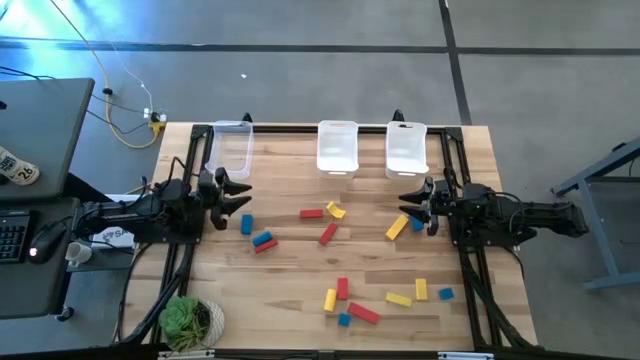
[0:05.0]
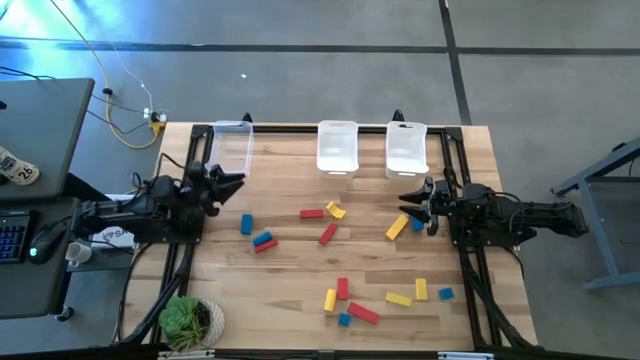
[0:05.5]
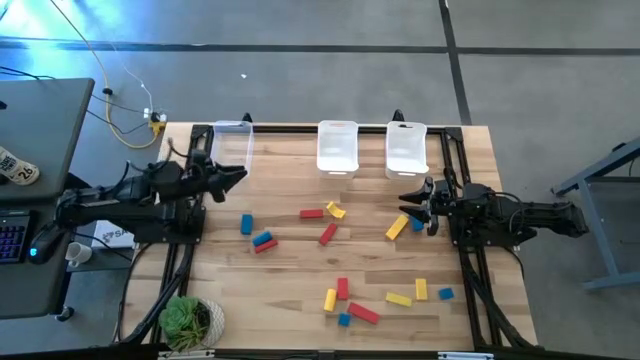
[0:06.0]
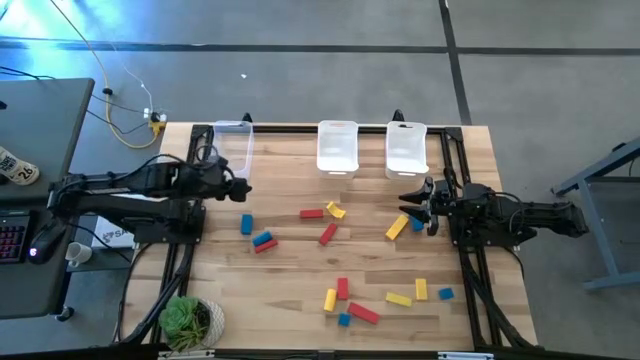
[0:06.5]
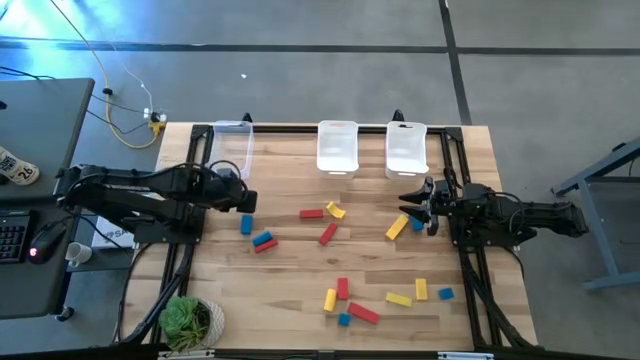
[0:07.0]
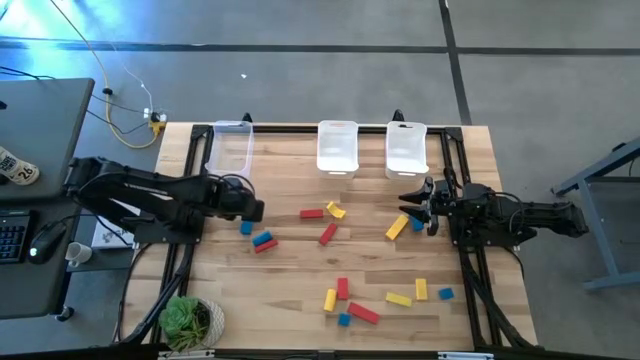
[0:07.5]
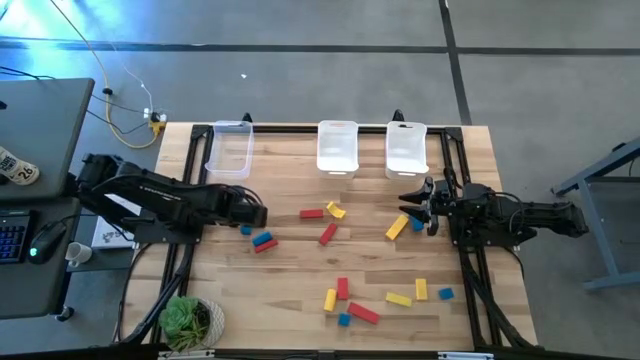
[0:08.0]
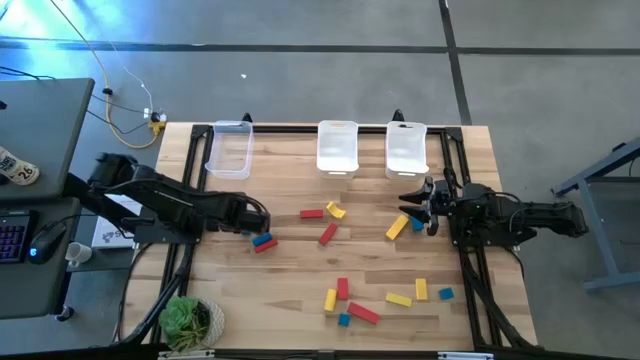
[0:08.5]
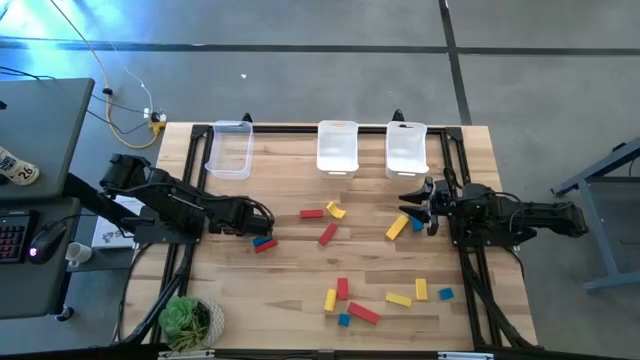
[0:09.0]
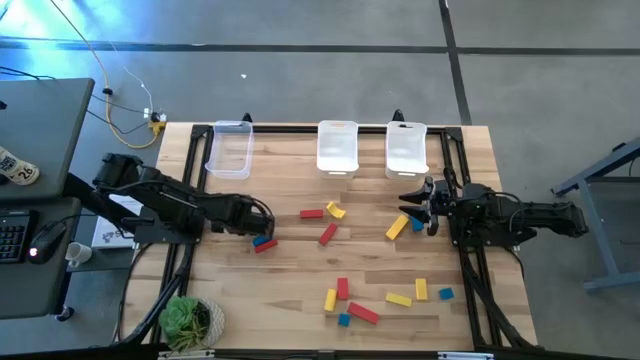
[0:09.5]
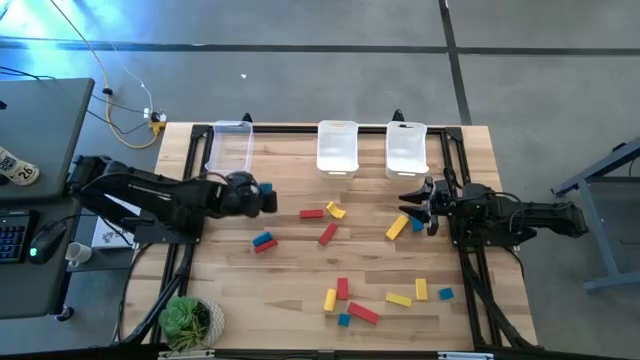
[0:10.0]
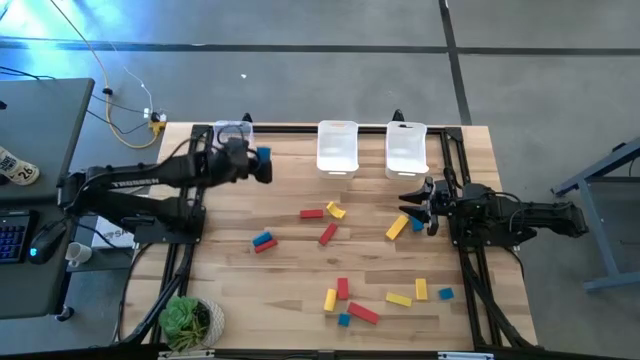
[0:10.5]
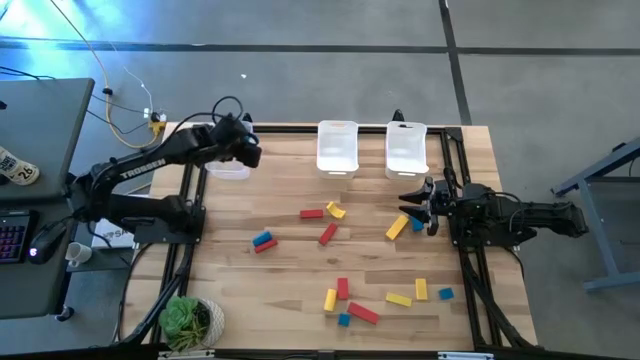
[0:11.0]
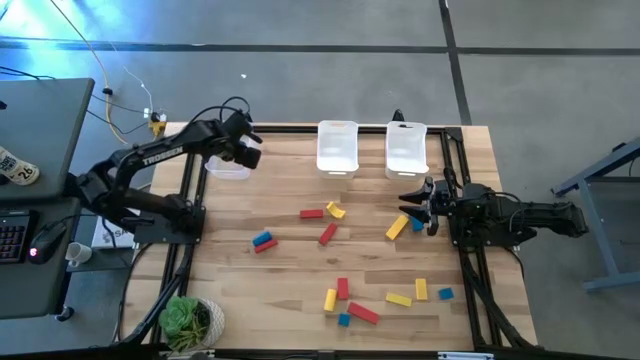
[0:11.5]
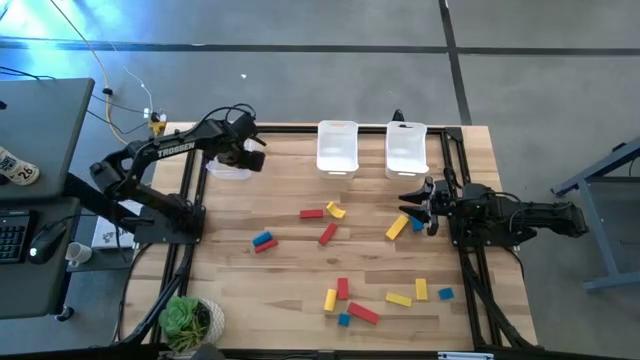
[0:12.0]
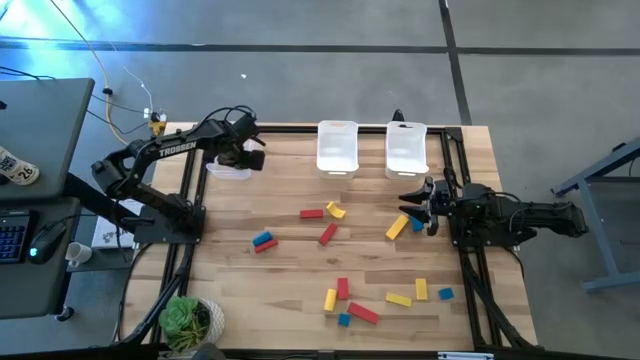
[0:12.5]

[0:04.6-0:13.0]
Task: Sort & place blocks by color
Put the blue block into the transparent bin

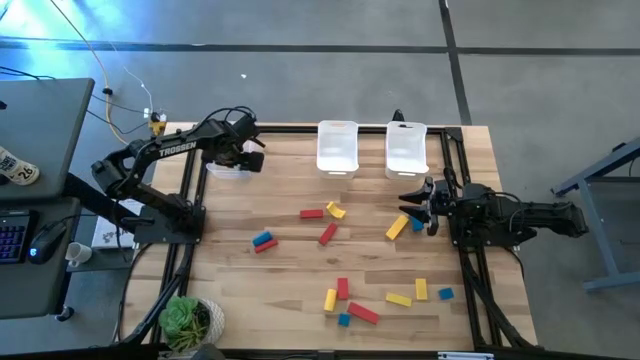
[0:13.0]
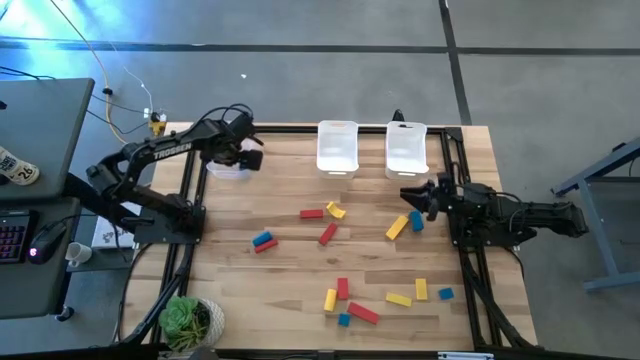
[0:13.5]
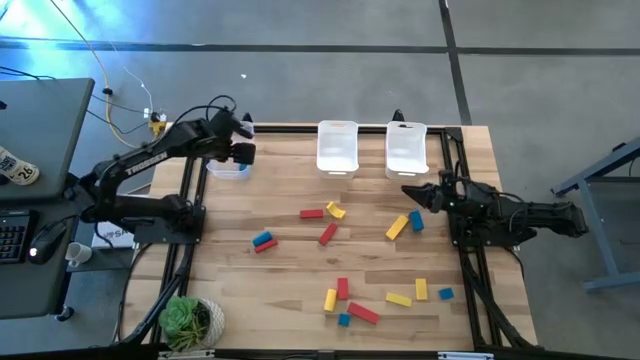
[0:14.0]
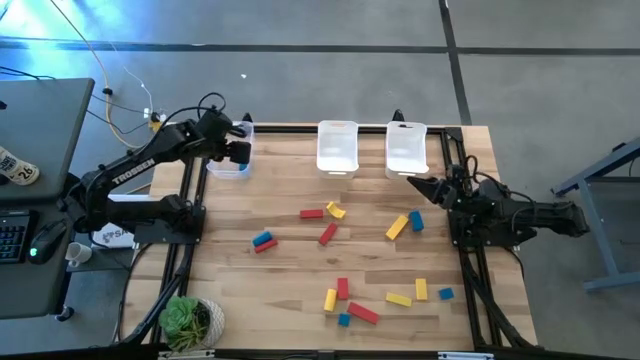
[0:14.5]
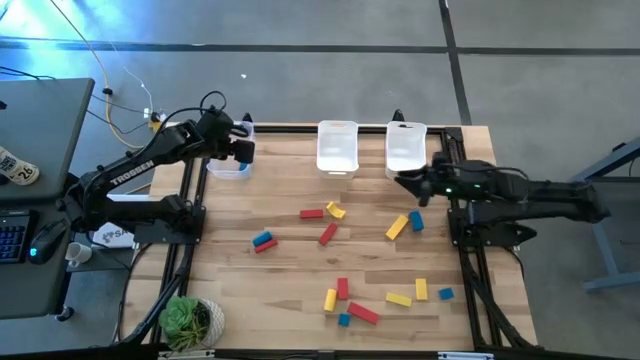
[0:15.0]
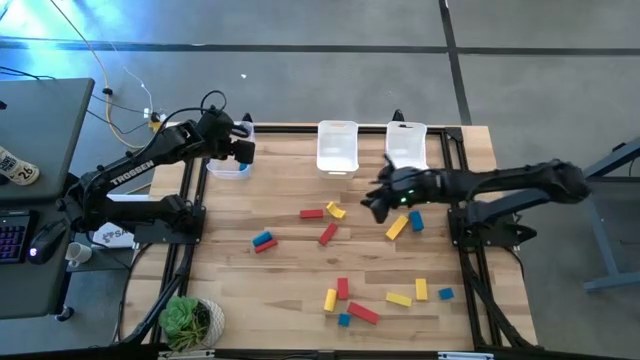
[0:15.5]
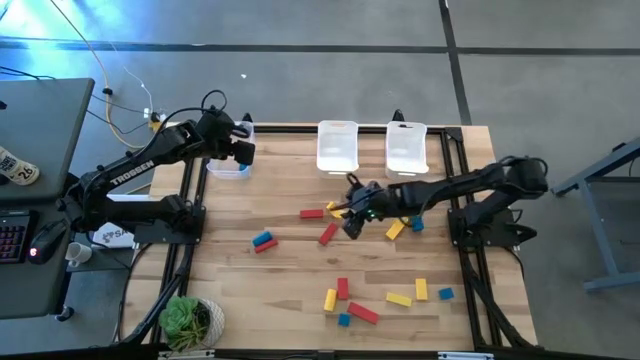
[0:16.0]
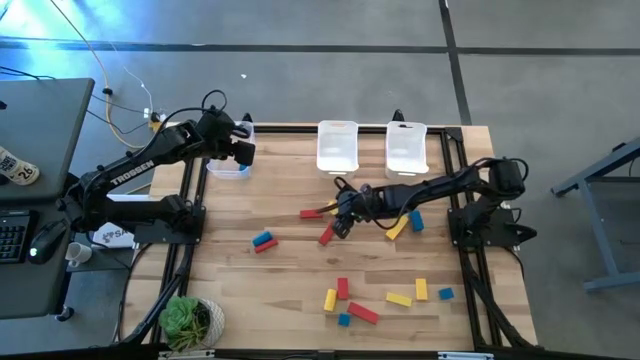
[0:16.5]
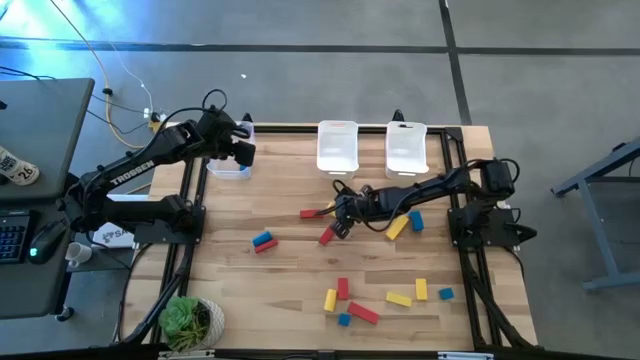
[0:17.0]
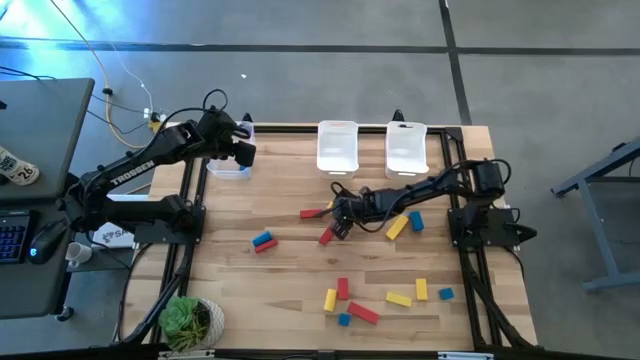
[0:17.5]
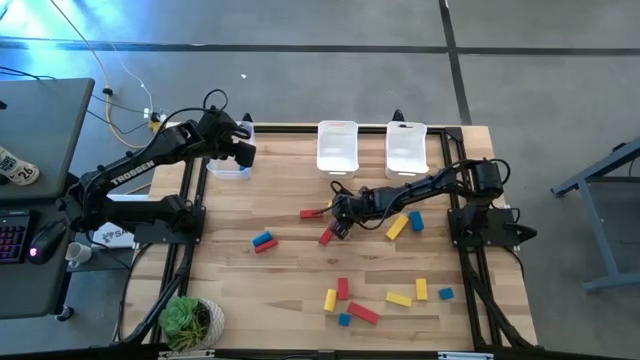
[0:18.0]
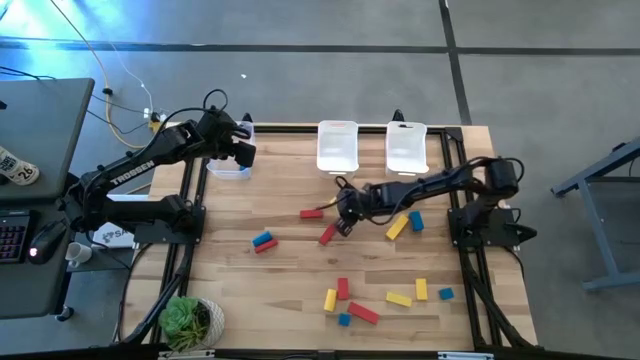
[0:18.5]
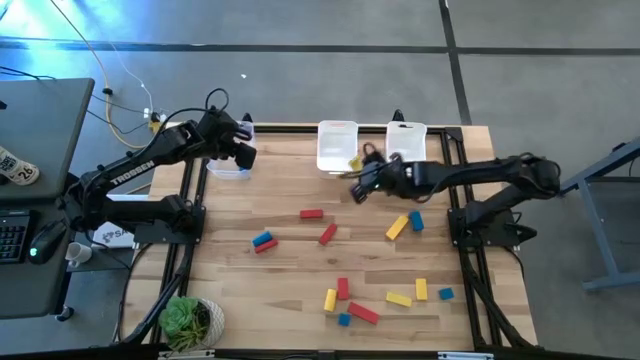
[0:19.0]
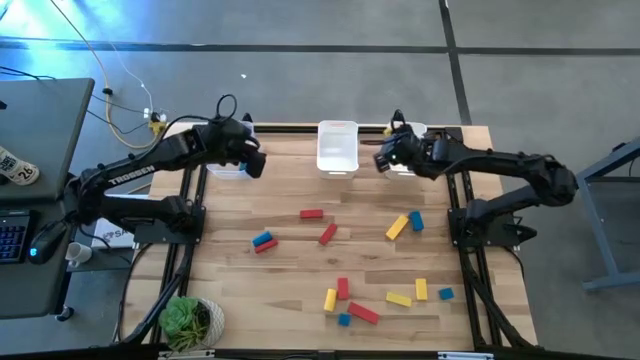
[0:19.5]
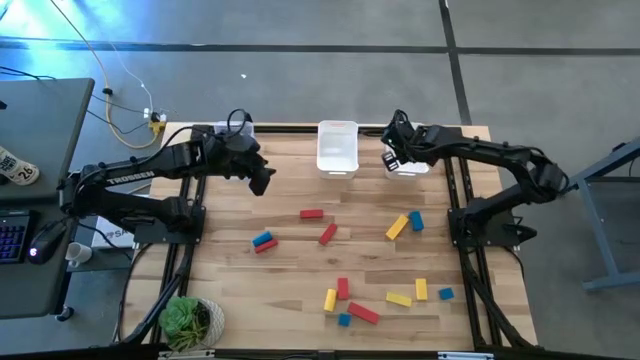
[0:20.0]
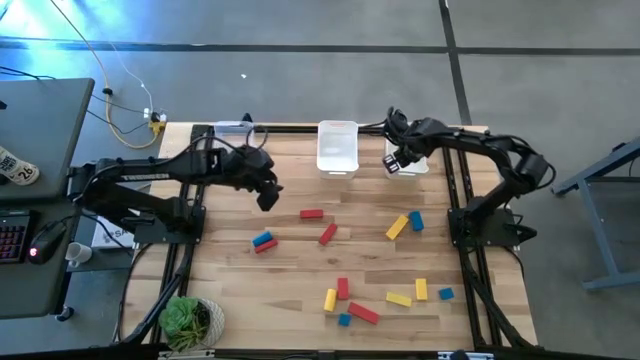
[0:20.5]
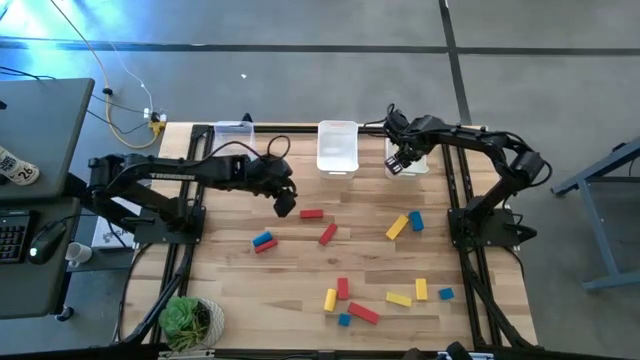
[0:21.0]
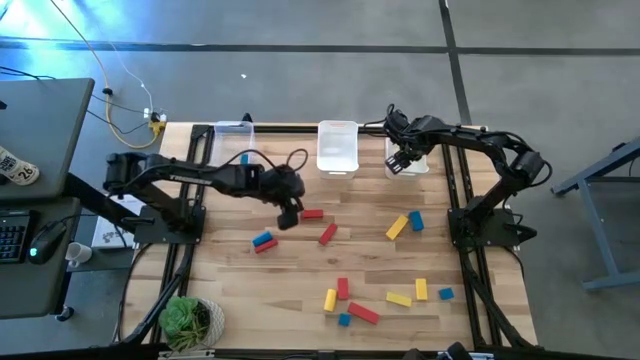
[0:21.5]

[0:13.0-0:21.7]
Put the yellow block into the right white bin

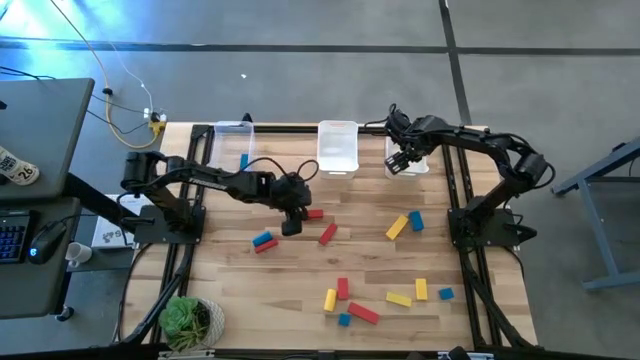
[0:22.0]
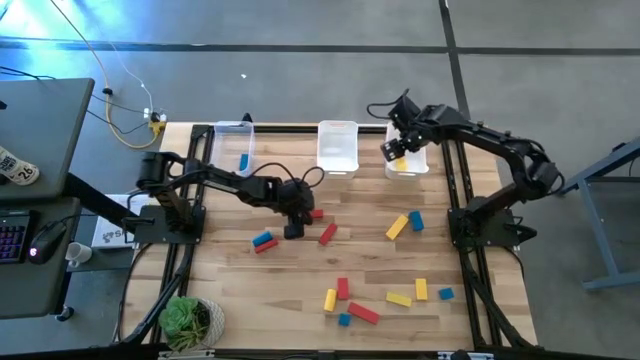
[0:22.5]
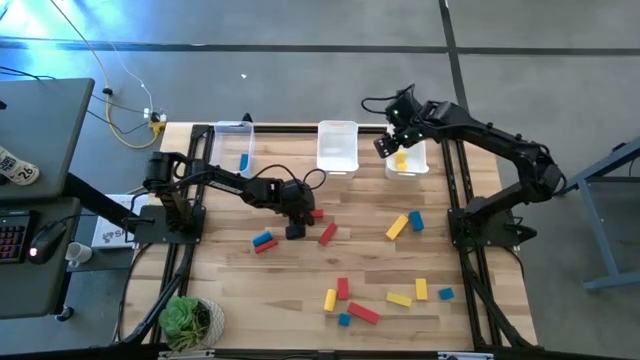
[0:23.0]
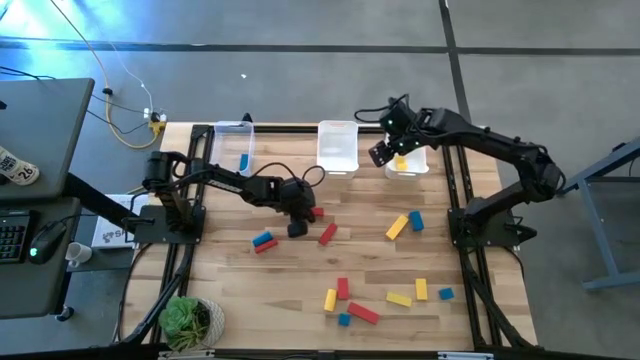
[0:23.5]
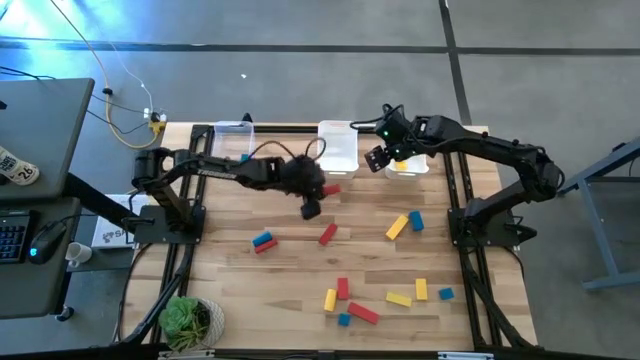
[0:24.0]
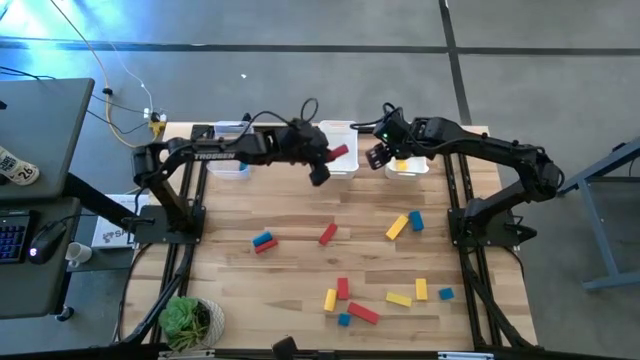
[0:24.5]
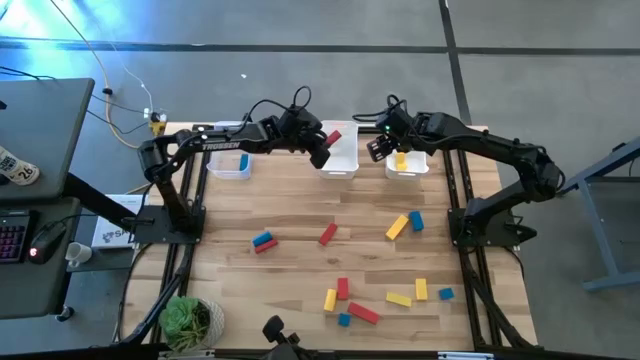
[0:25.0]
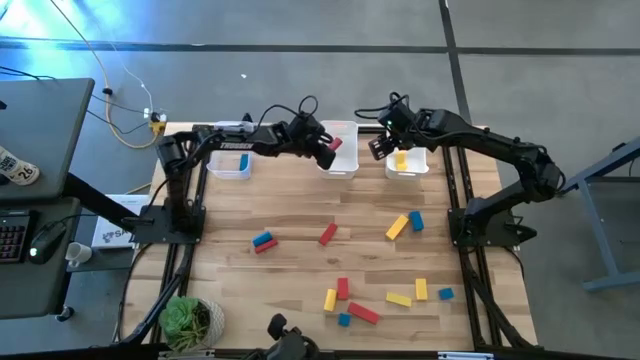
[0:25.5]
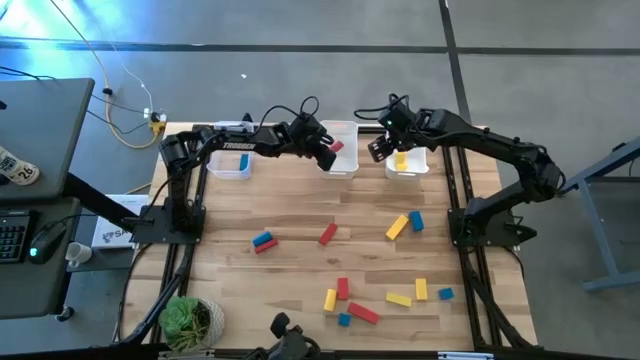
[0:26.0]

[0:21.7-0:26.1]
Put the red block into the left white bin

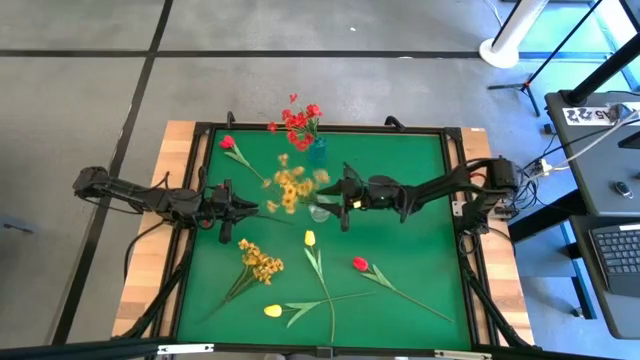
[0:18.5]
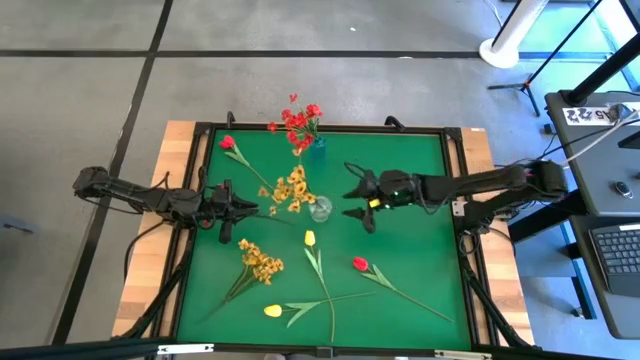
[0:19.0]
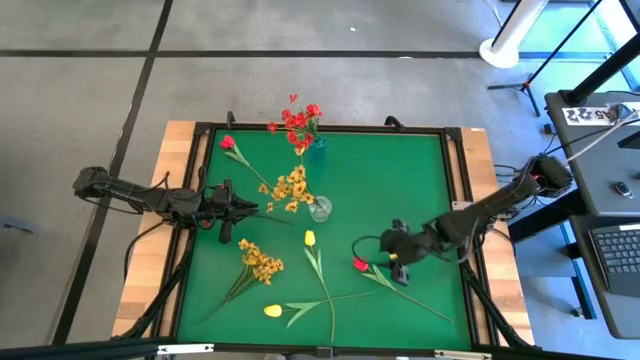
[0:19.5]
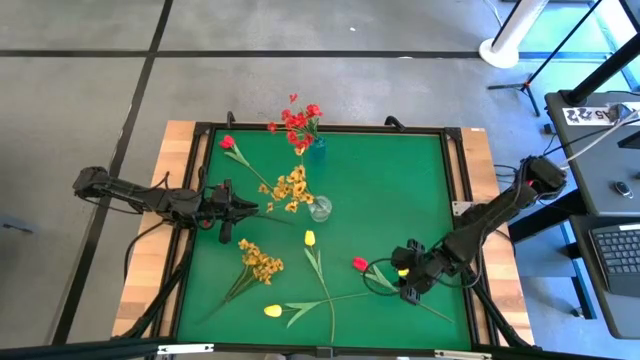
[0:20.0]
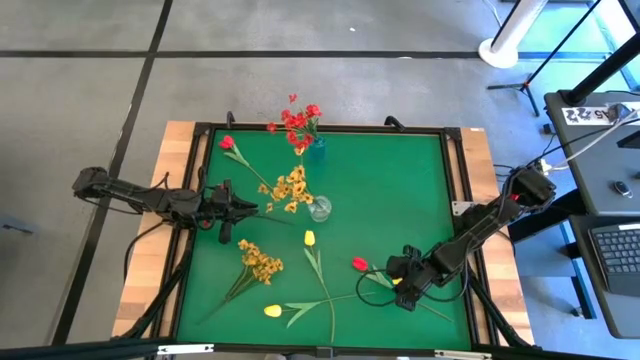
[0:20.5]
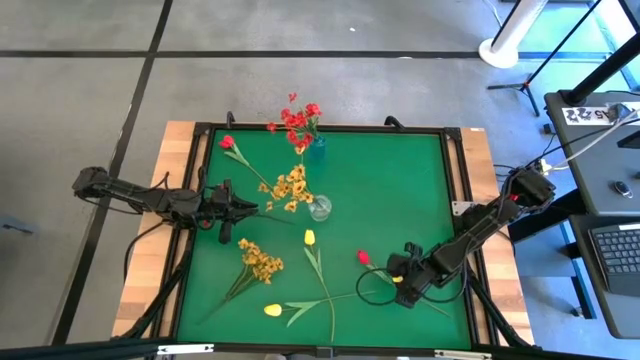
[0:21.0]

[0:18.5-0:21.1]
Task: Sort flowers into vase by color
Put the bottom red tulip into the blue vase
